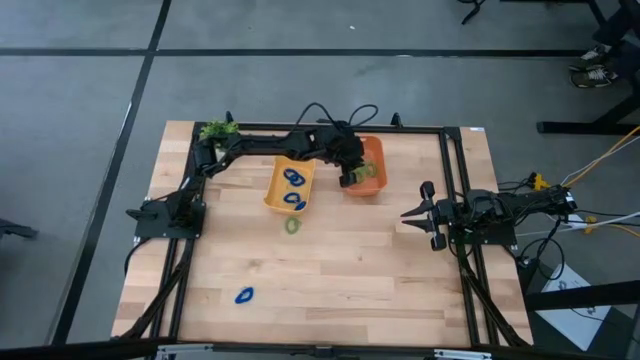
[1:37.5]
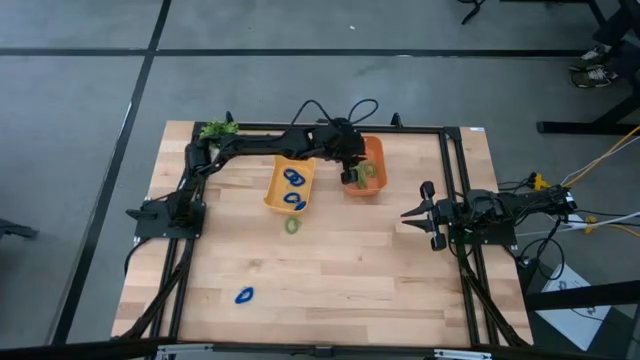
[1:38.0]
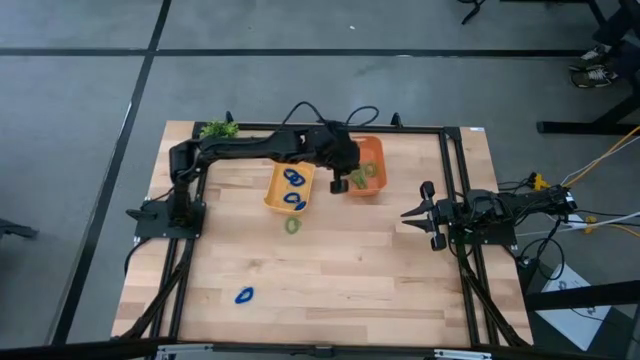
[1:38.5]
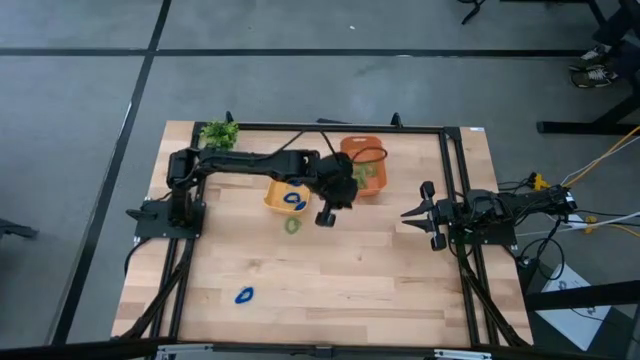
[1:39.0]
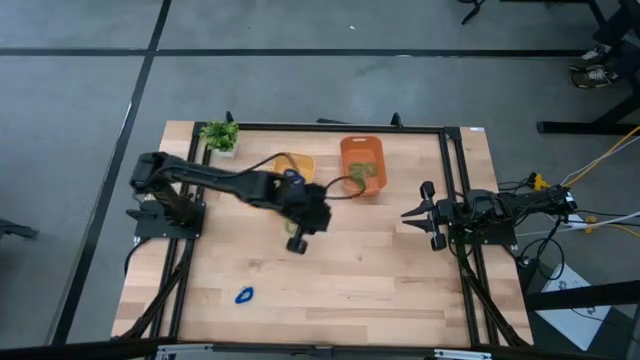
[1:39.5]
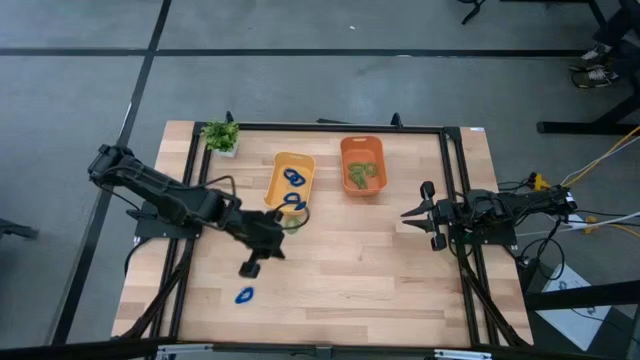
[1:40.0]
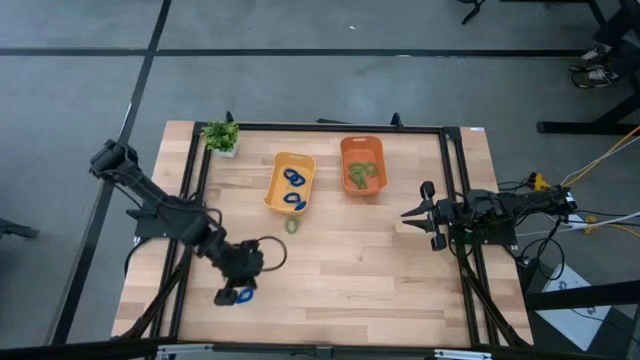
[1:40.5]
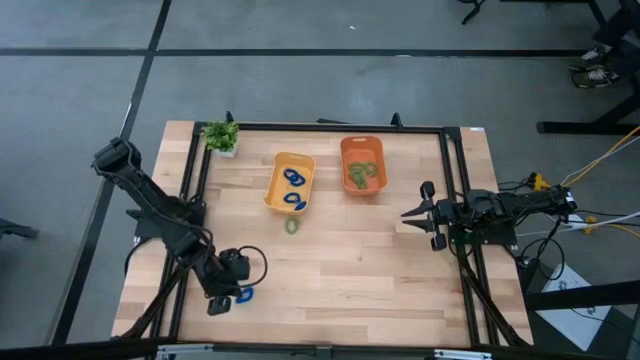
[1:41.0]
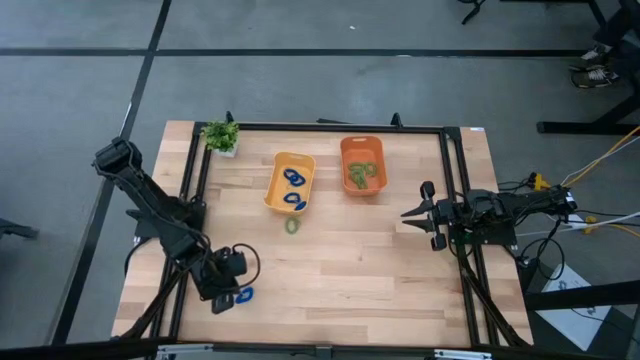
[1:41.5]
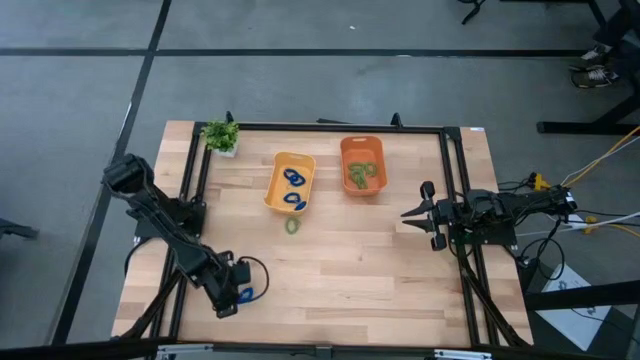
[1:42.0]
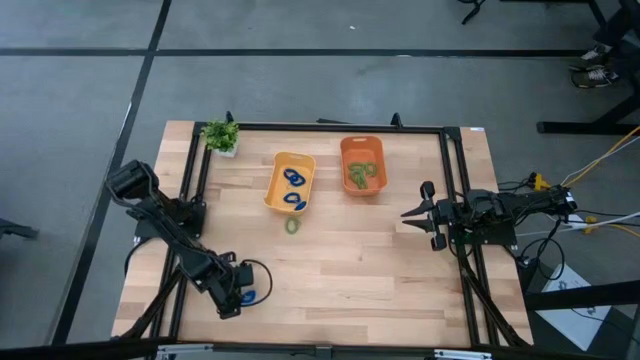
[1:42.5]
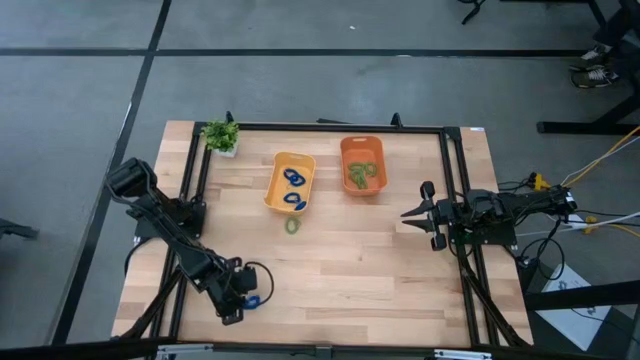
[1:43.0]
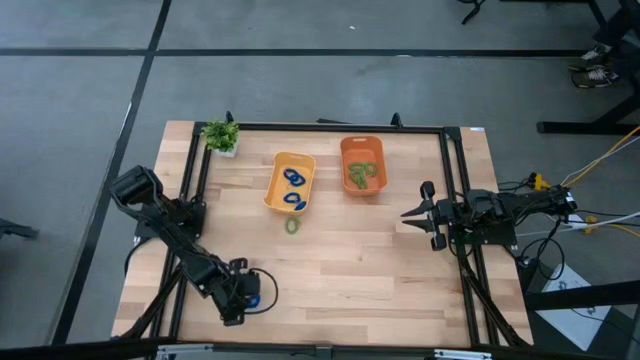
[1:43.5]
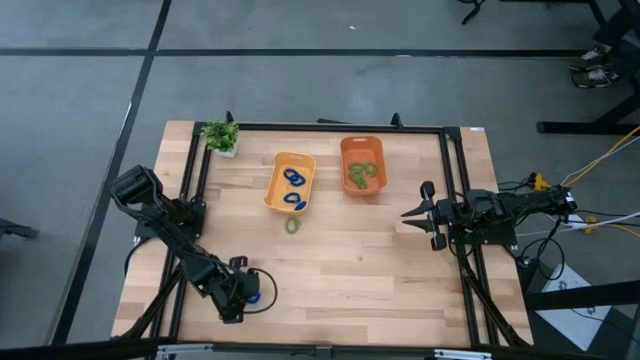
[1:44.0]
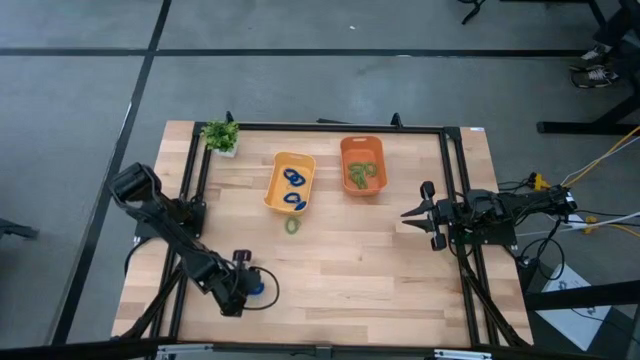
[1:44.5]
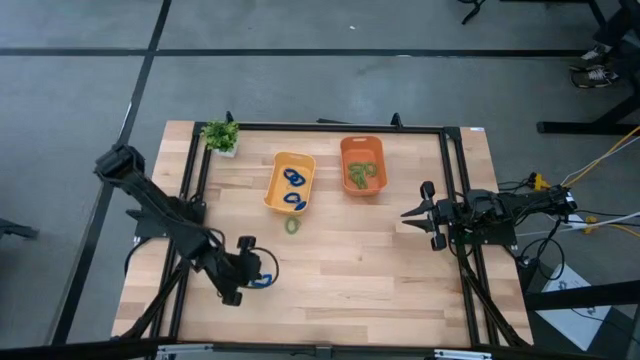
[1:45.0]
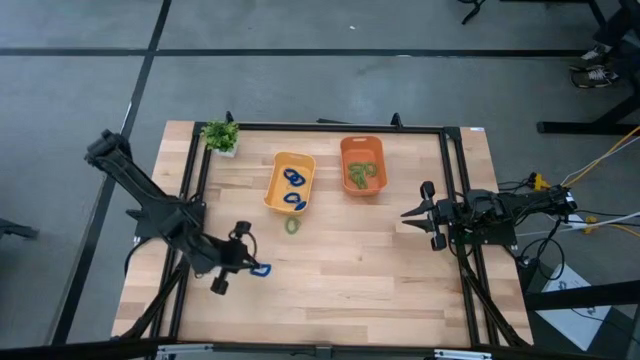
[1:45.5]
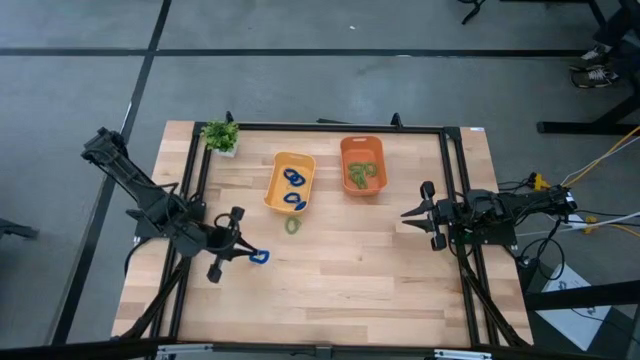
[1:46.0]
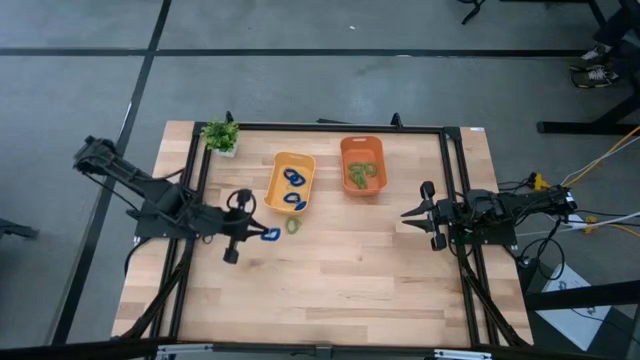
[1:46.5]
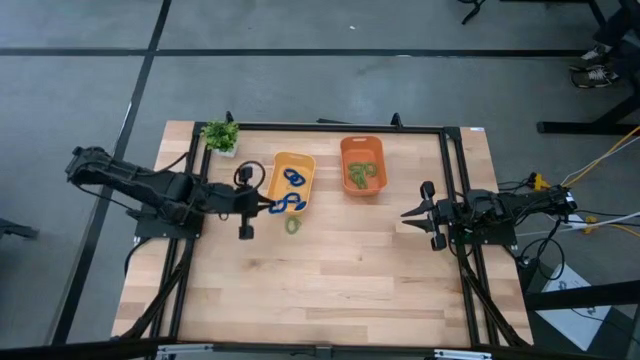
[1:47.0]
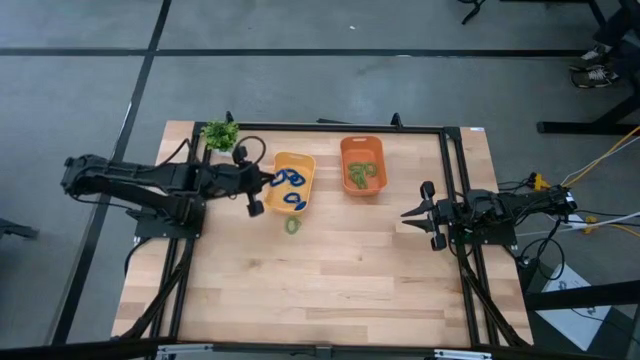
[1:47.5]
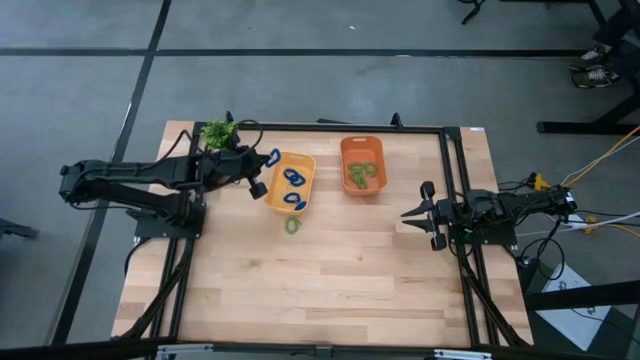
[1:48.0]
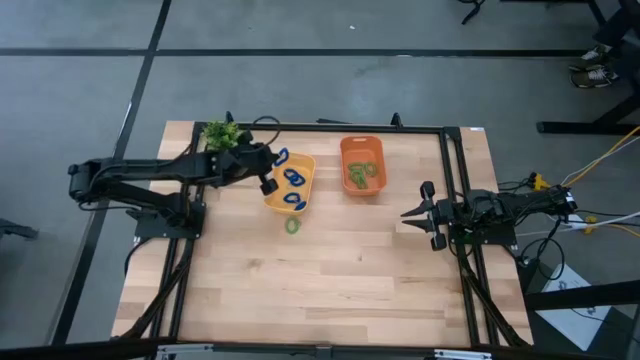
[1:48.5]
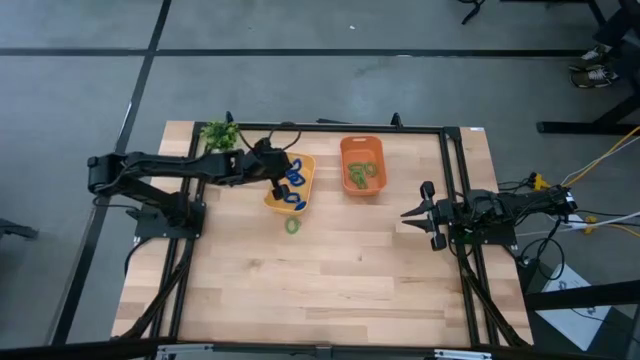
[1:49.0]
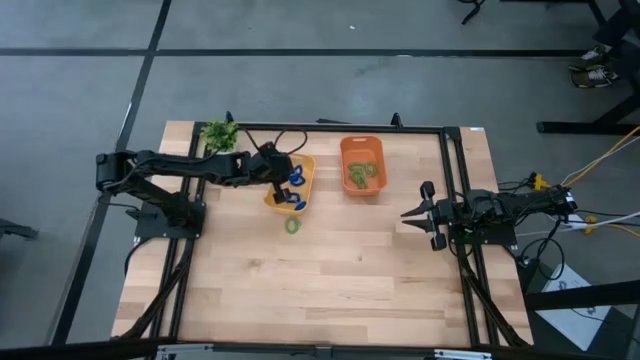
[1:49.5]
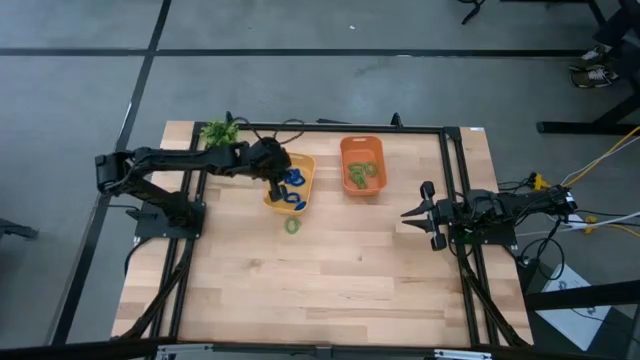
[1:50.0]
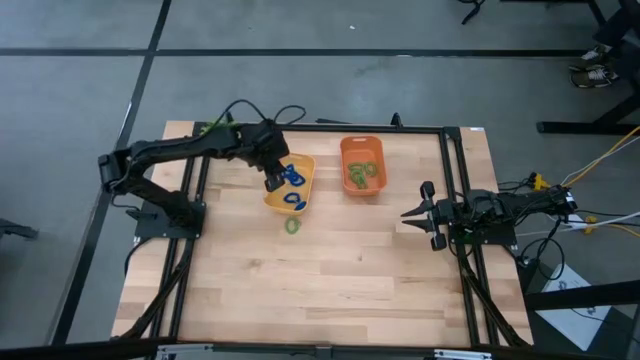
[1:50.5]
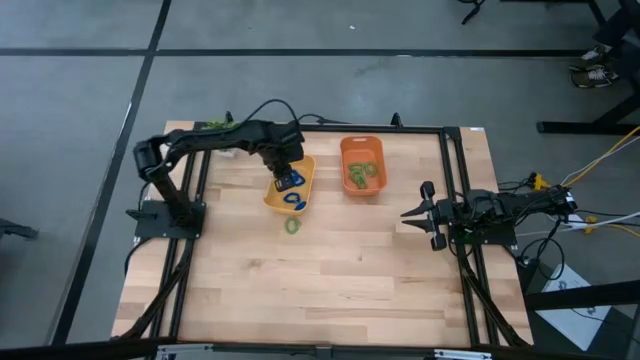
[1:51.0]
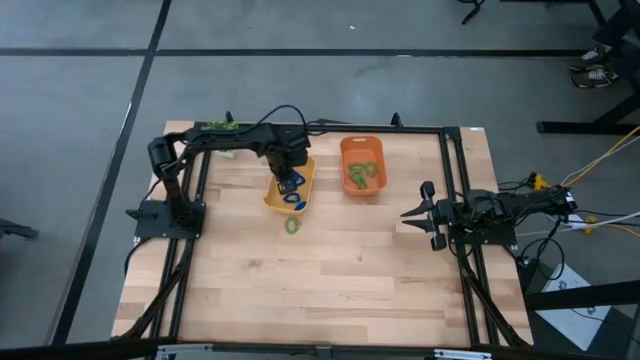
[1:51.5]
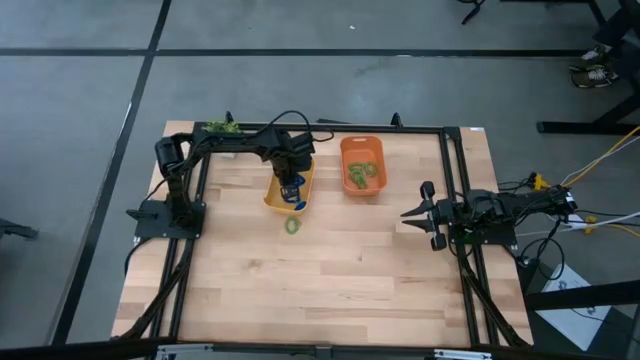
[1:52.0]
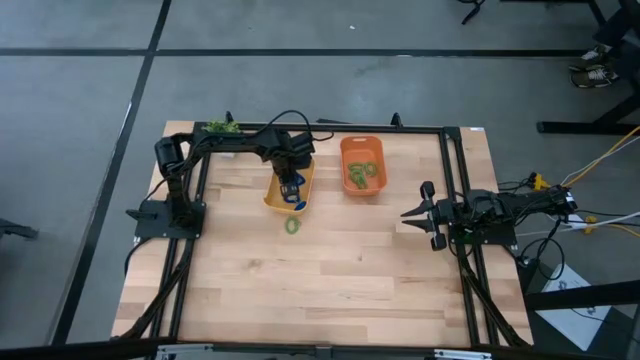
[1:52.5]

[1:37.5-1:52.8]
Task: Sort items
Put the blue keychain into the yellow bin

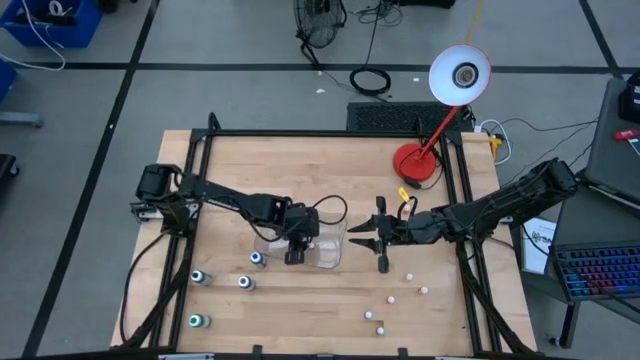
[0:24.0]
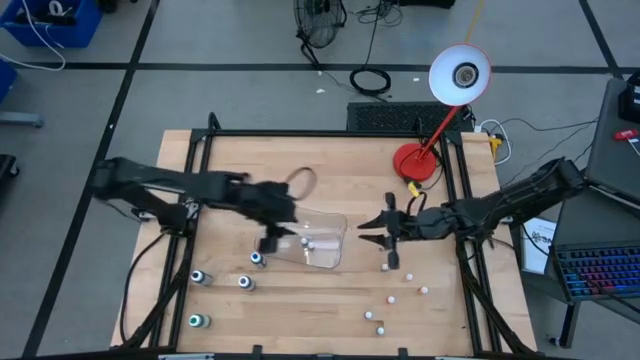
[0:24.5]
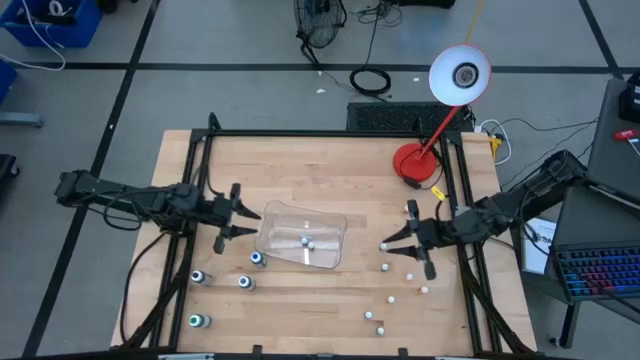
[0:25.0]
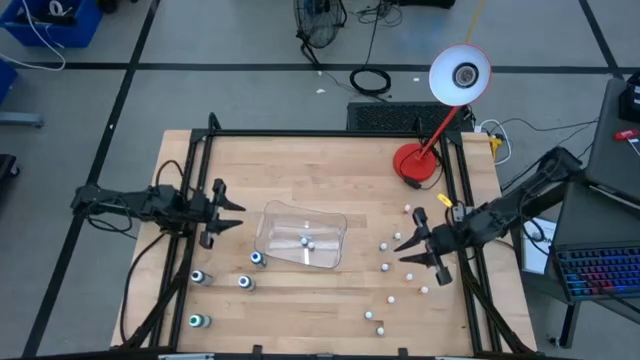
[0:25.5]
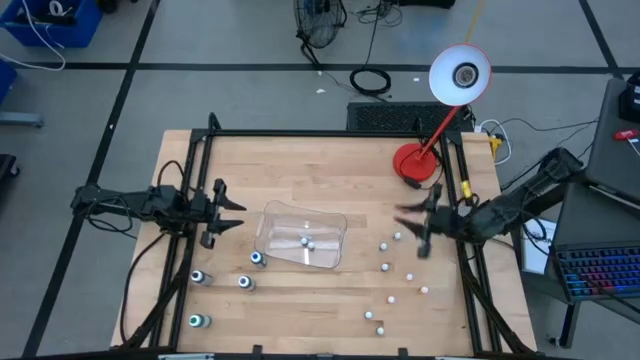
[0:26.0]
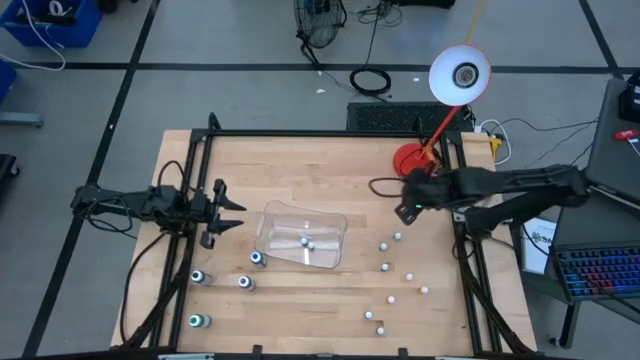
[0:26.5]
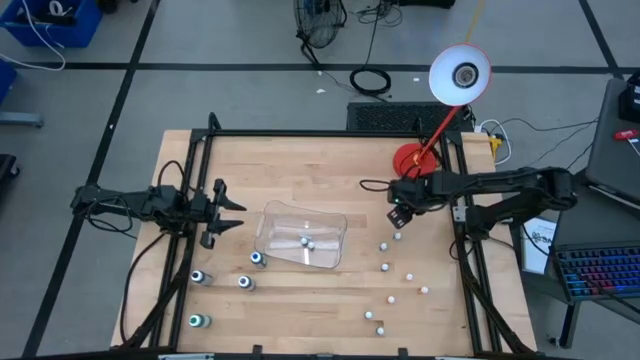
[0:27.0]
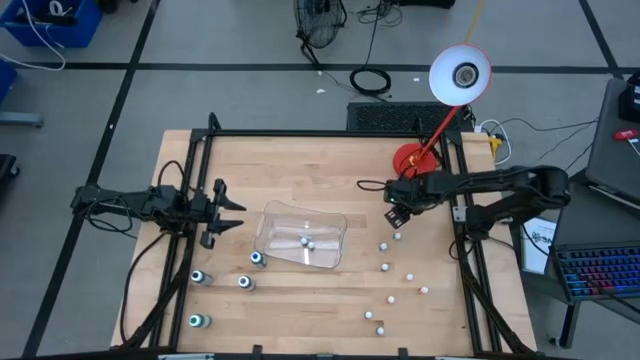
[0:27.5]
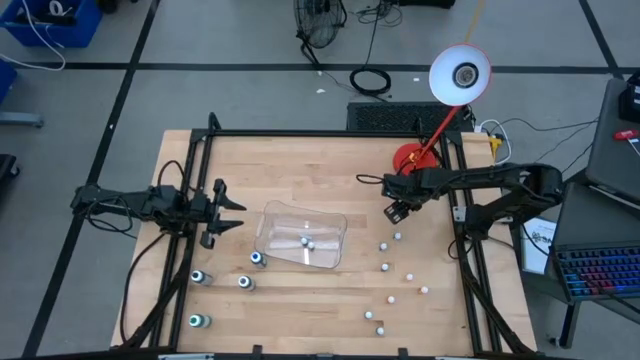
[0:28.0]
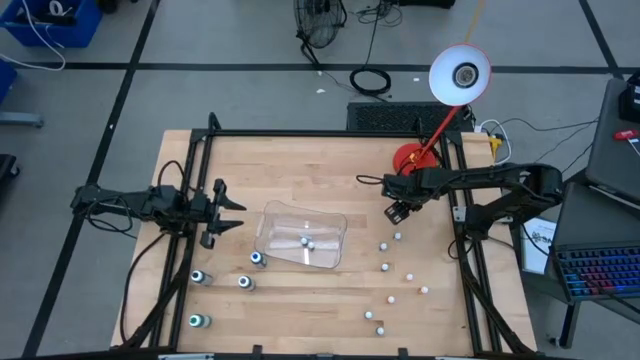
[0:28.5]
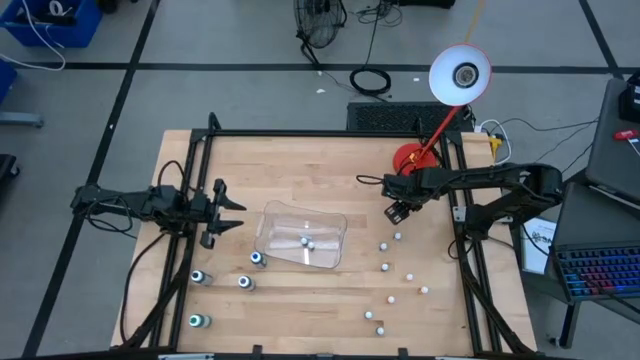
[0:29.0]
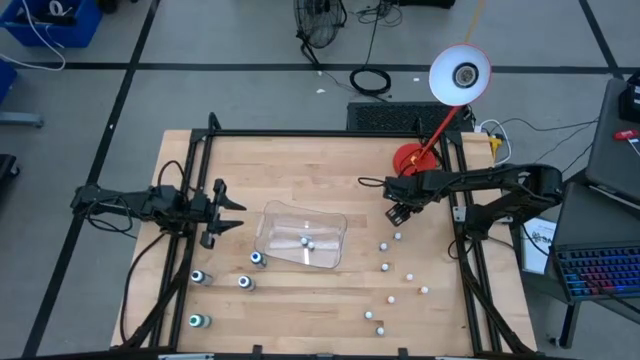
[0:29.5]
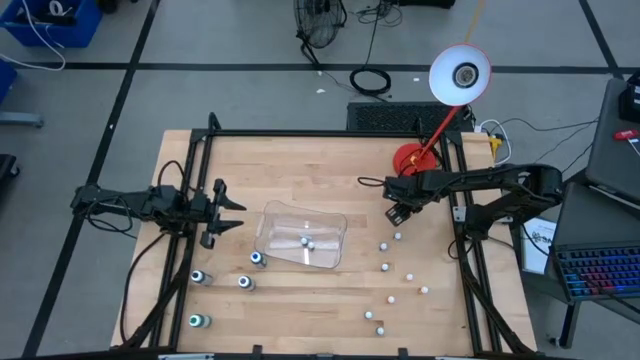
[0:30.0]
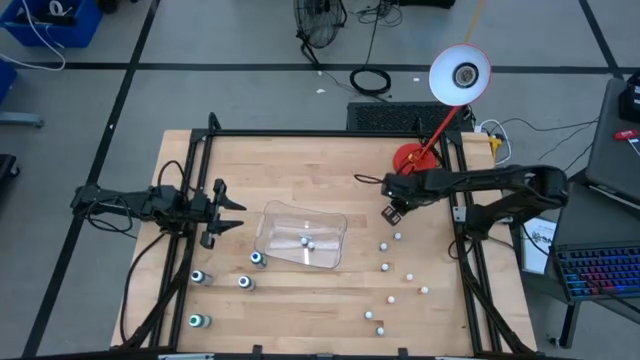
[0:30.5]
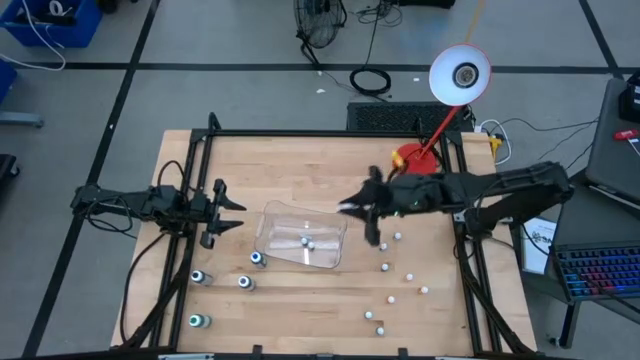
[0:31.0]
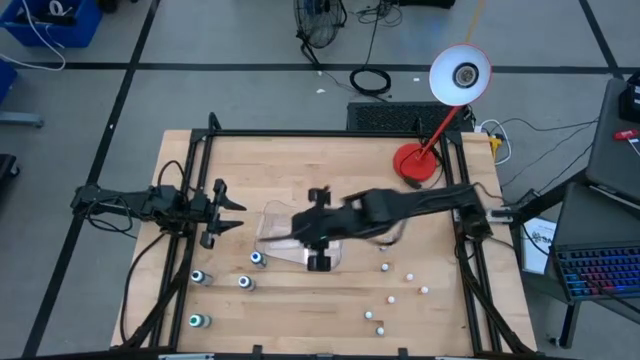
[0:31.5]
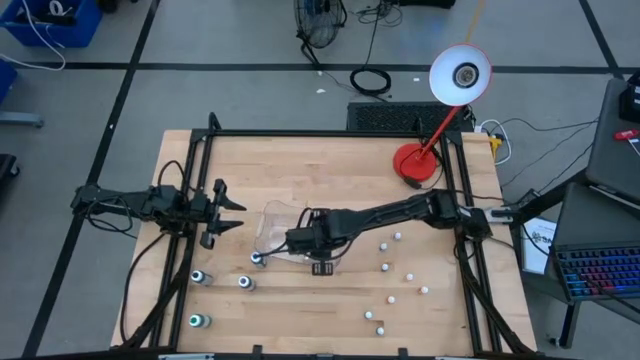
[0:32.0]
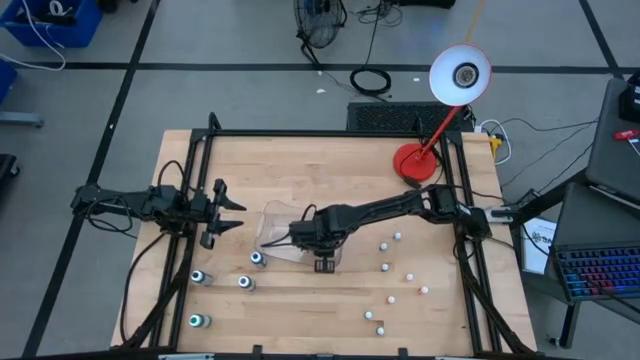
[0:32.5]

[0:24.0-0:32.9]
Task: Pick & Place food coloring
Put the small orange food coloring bottle into the transparent bin
